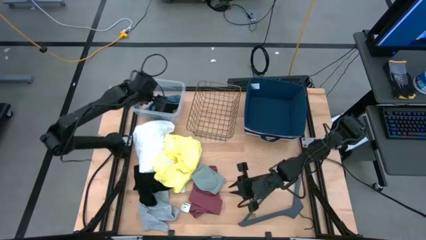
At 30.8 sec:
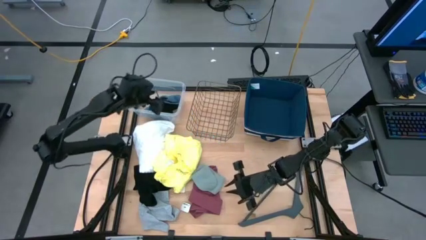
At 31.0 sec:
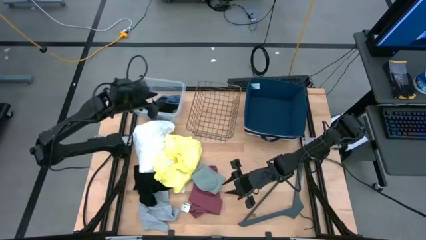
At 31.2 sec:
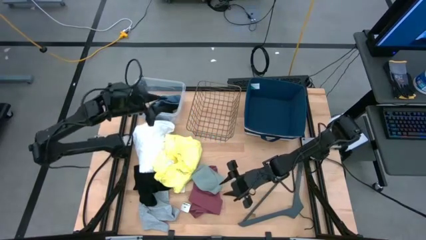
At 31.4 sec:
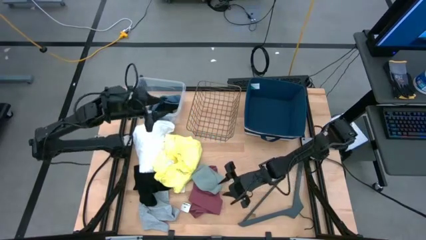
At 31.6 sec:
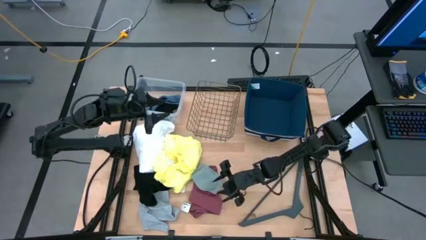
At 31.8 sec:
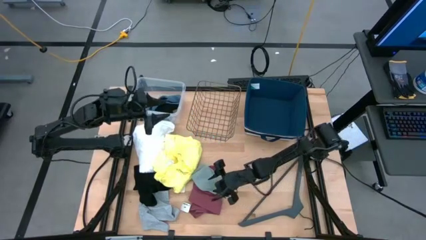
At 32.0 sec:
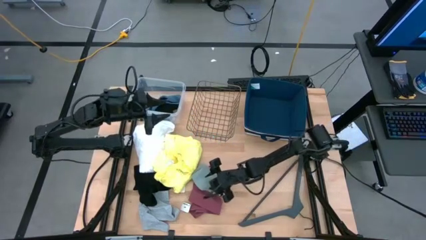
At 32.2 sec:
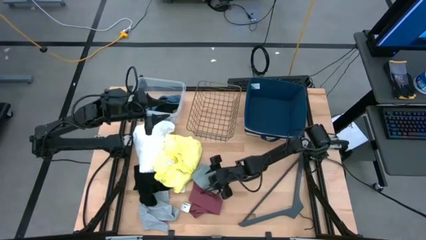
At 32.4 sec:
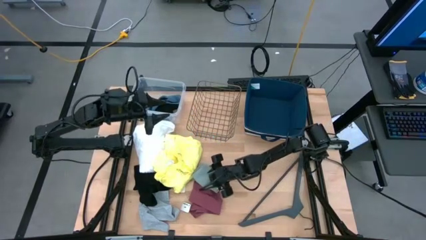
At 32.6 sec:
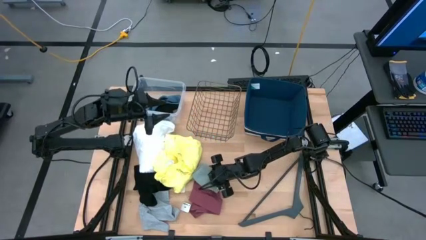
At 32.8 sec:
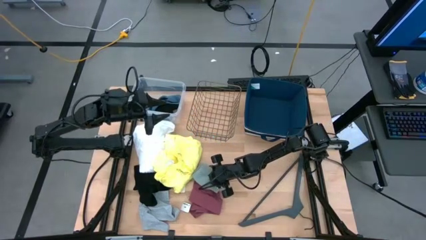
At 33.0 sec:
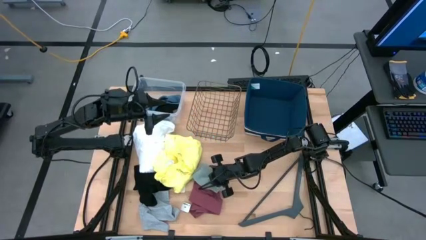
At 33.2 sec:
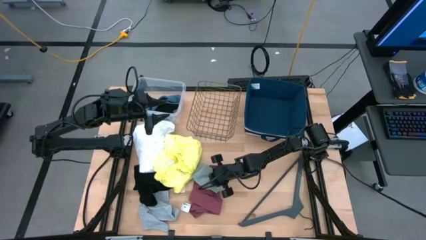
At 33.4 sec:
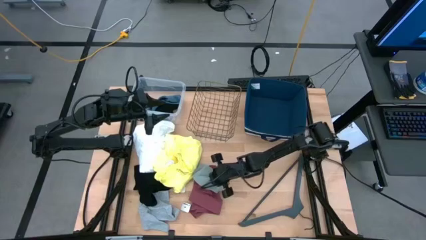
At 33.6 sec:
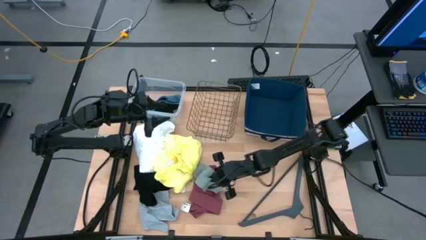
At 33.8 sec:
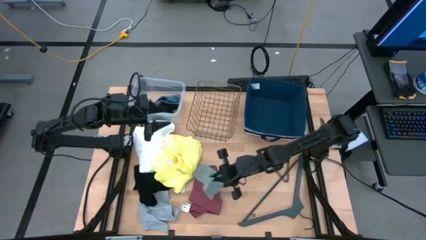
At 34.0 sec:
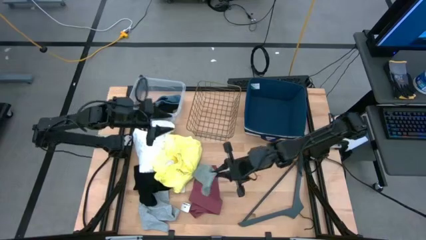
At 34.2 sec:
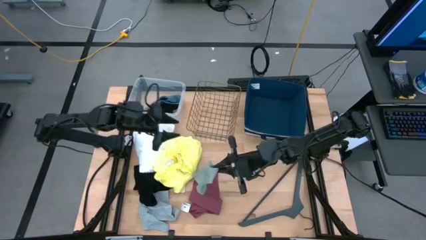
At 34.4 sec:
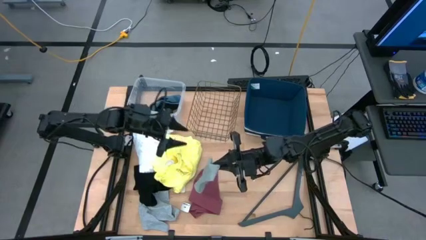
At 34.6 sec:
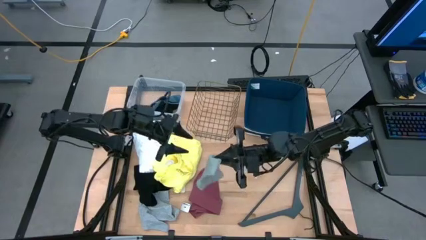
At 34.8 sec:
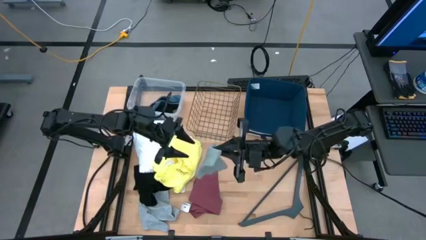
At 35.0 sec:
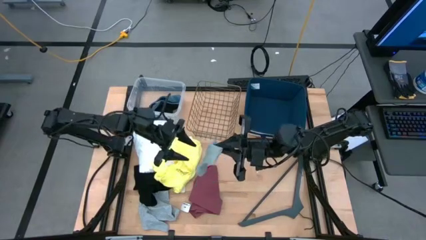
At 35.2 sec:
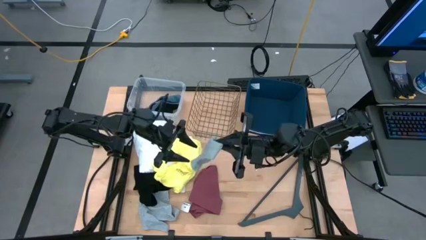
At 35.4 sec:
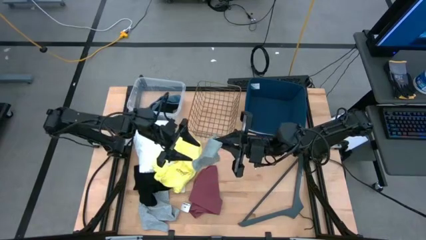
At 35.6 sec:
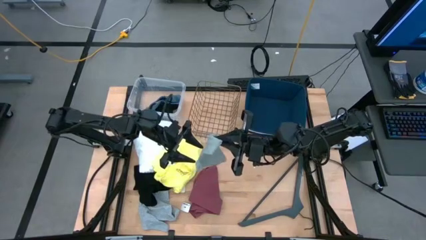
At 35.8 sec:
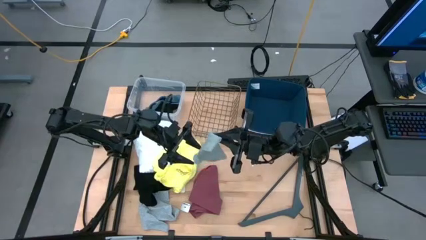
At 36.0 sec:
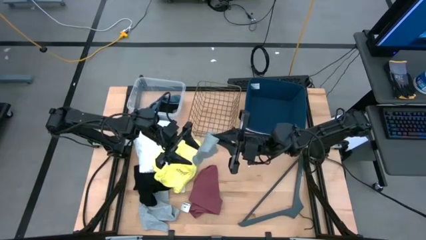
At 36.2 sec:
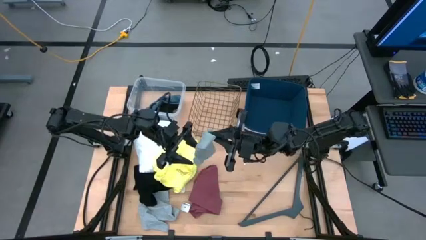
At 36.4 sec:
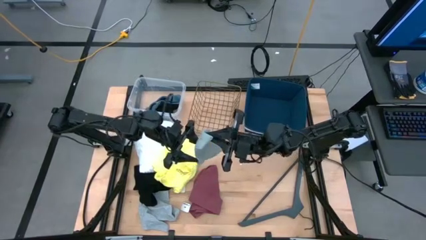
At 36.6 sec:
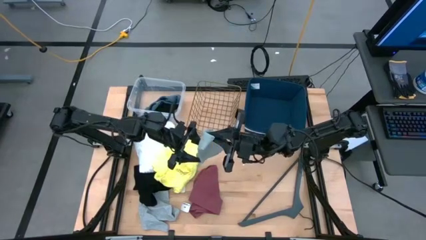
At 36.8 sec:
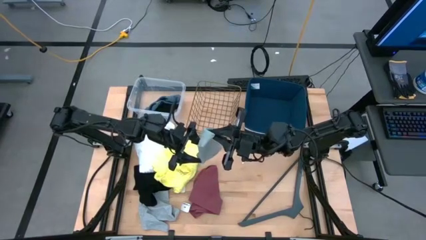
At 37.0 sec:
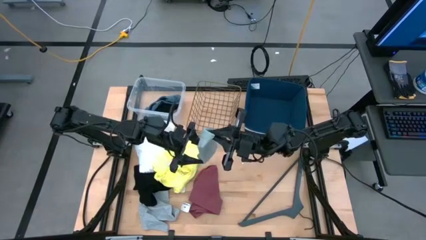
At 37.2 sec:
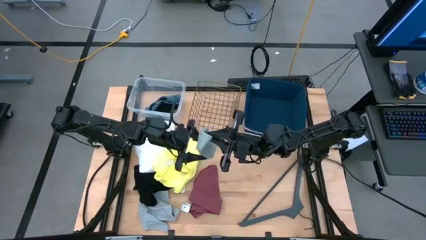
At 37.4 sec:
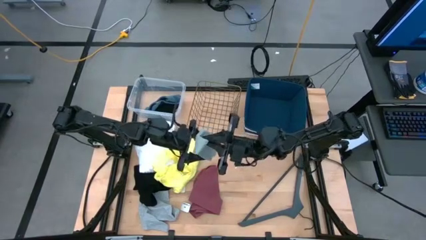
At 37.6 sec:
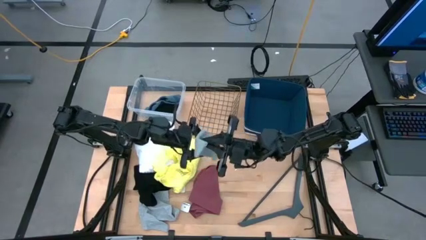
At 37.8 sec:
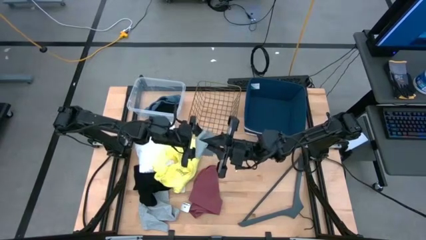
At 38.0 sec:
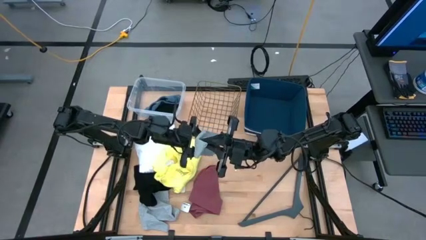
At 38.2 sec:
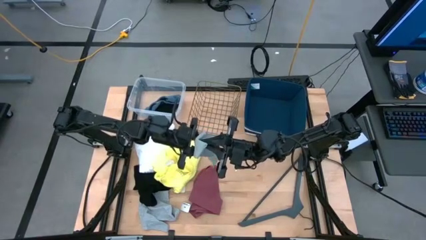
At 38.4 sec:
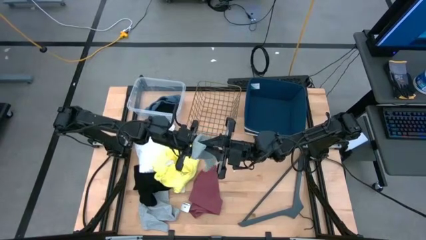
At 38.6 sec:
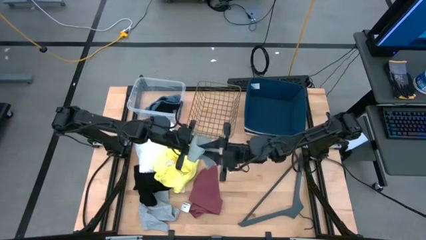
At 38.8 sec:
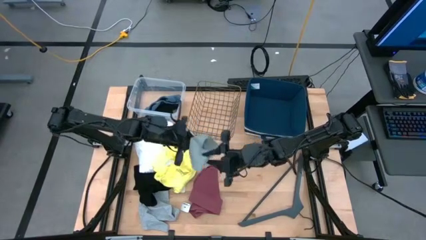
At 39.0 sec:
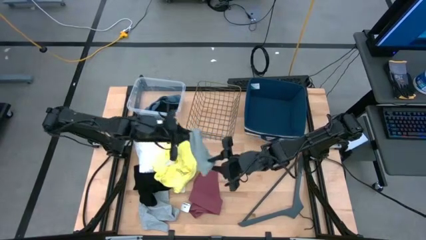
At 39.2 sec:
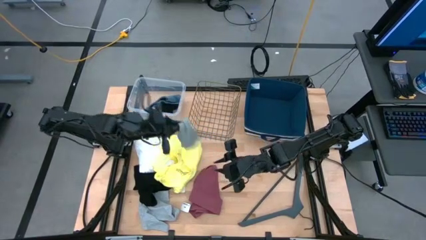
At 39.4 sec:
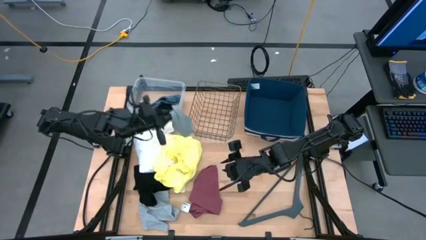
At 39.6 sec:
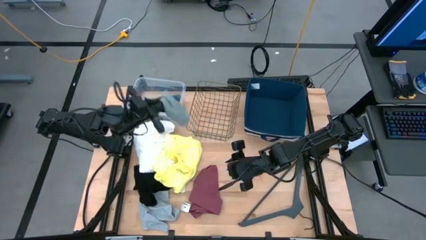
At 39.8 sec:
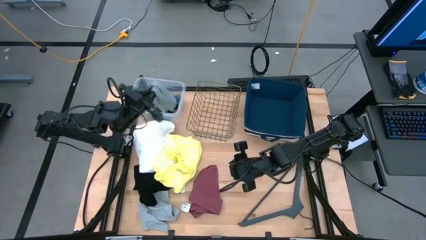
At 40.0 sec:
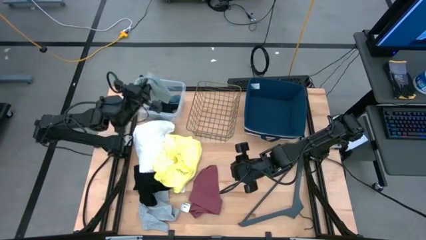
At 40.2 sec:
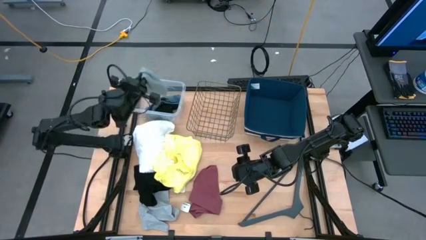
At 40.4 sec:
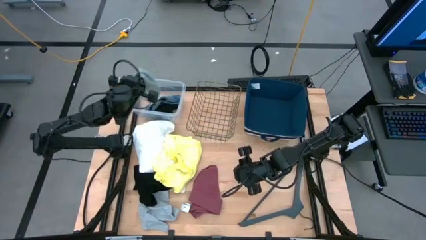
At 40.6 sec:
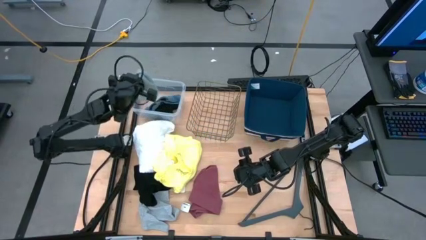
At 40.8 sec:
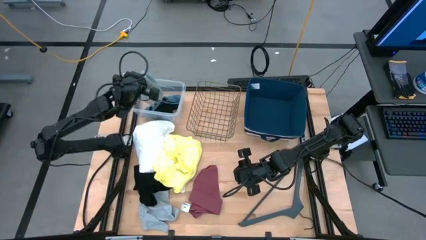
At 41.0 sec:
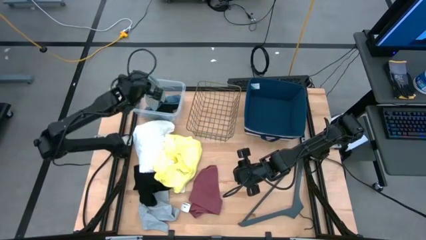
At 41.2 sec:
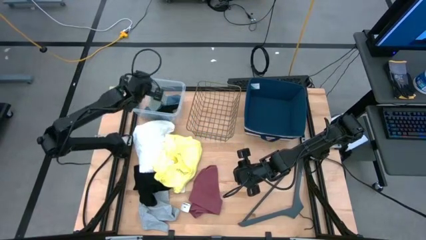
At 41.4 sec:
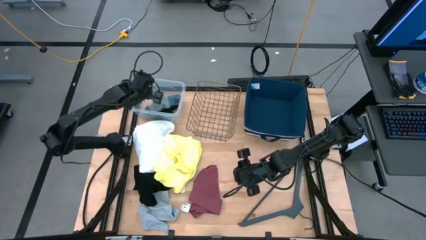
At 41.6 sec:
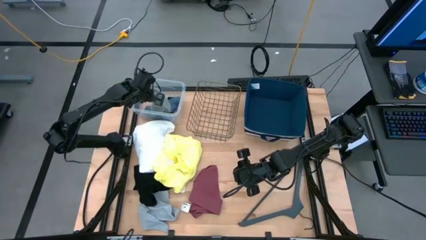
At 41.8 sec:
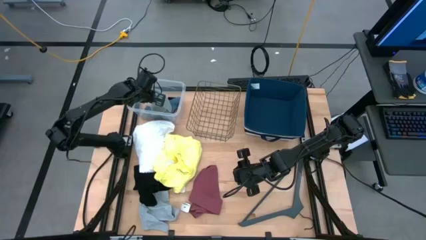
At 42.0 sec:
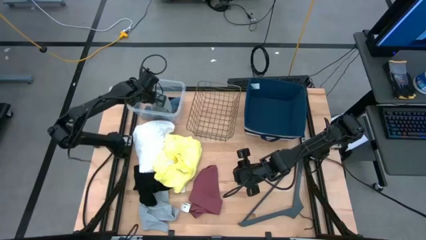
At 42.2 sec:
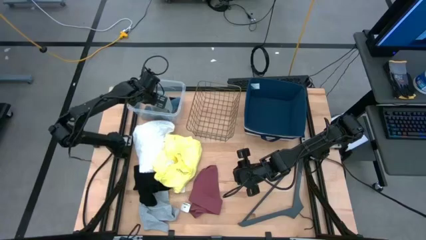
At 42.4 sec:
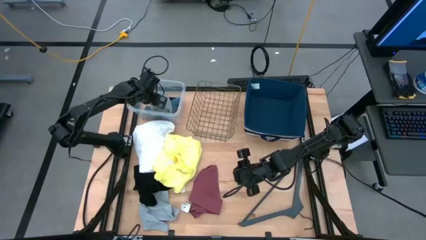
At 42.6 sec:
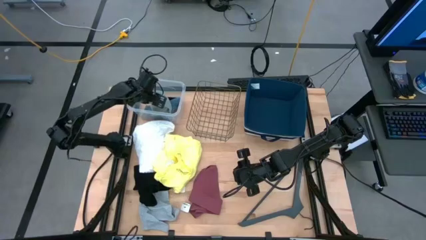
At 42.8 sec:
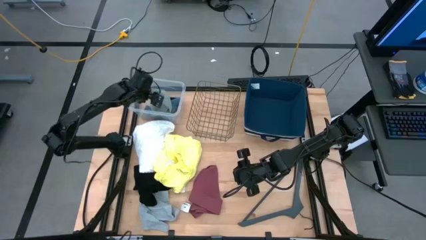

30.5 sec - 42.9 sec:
Task: Pick & Place Cloths
Put the gray sock into the transparent bin

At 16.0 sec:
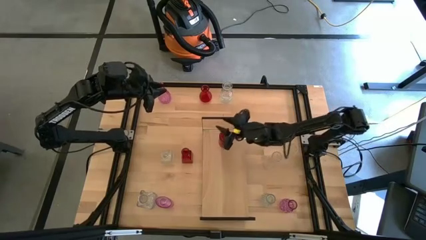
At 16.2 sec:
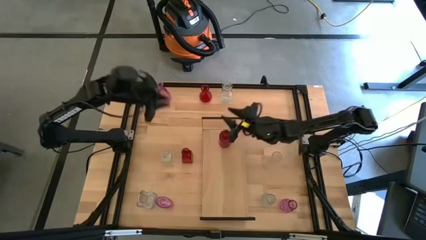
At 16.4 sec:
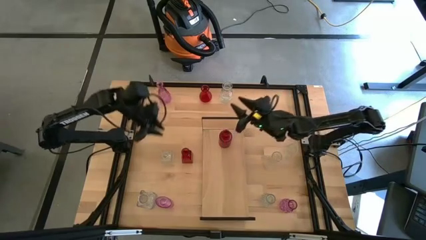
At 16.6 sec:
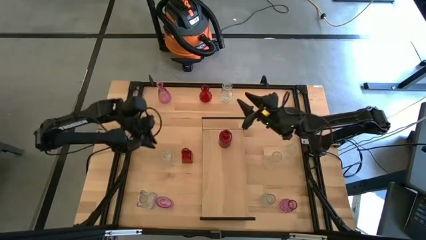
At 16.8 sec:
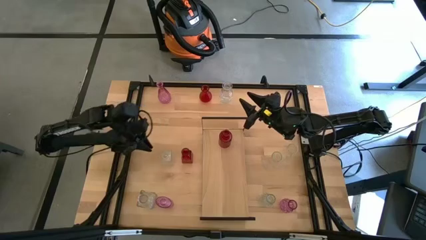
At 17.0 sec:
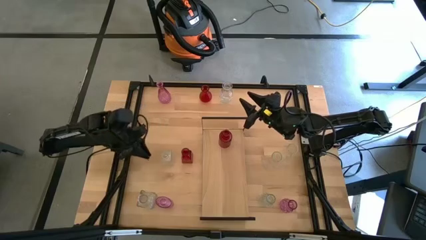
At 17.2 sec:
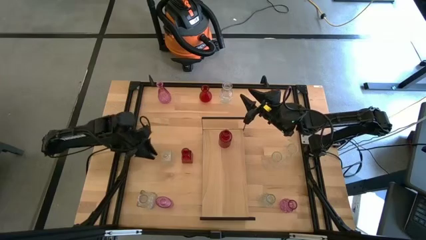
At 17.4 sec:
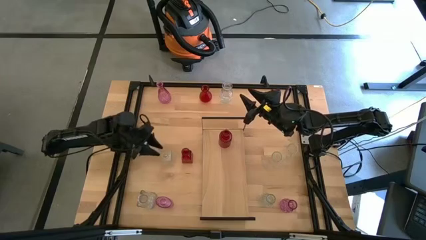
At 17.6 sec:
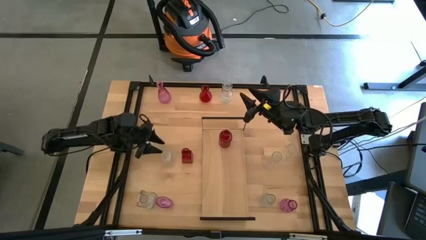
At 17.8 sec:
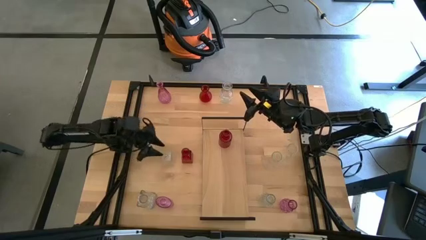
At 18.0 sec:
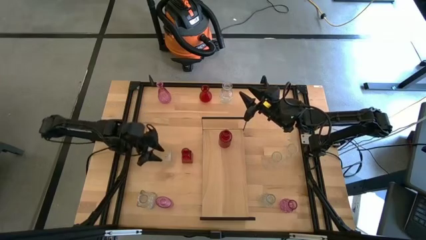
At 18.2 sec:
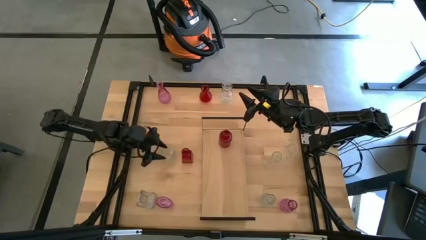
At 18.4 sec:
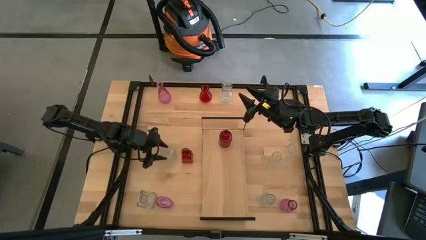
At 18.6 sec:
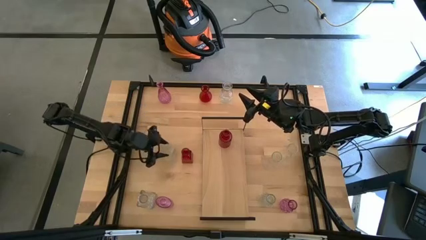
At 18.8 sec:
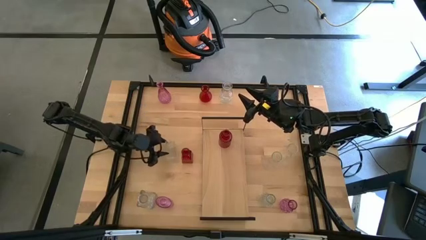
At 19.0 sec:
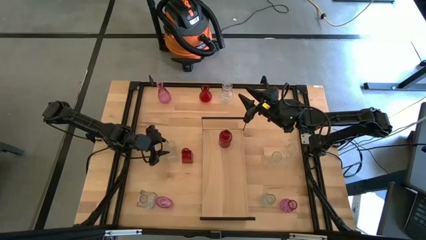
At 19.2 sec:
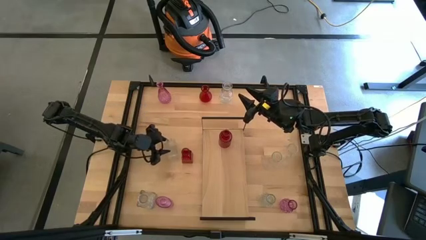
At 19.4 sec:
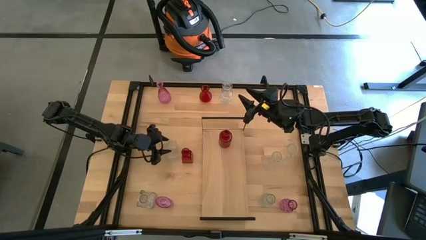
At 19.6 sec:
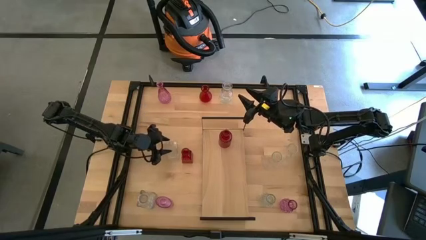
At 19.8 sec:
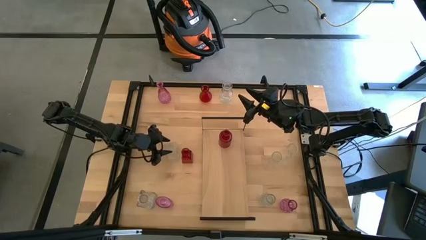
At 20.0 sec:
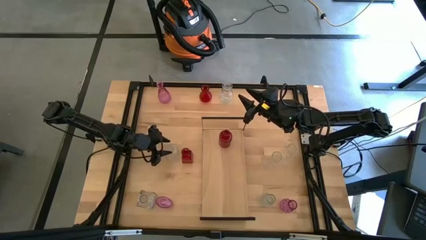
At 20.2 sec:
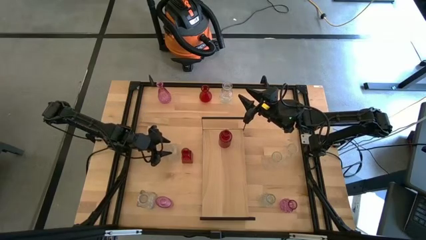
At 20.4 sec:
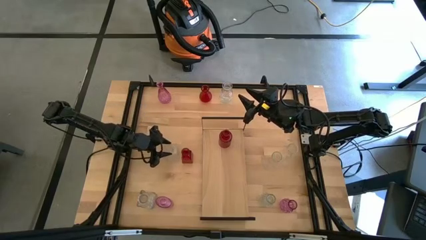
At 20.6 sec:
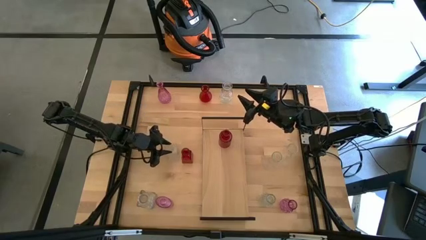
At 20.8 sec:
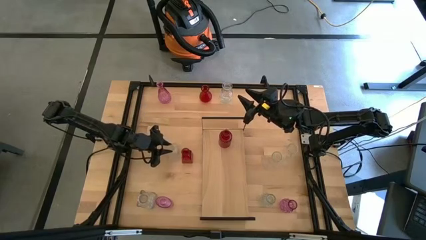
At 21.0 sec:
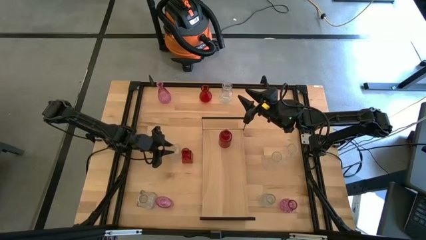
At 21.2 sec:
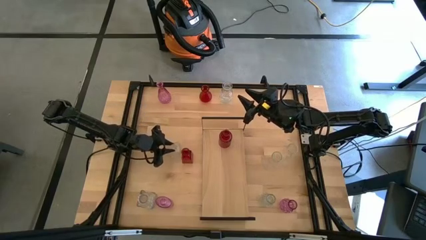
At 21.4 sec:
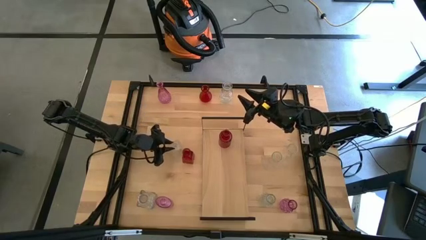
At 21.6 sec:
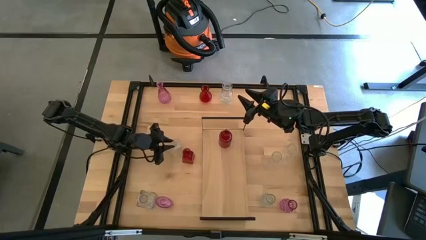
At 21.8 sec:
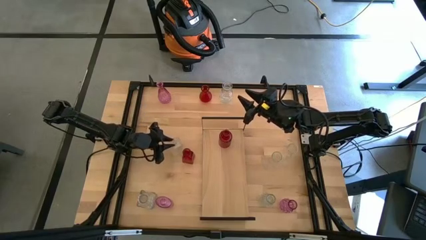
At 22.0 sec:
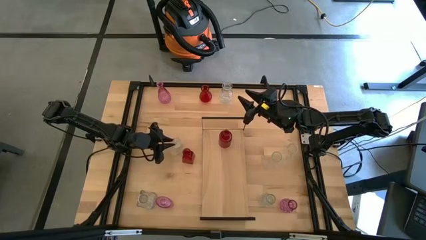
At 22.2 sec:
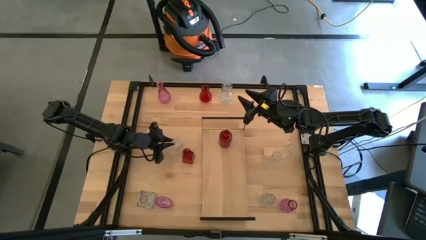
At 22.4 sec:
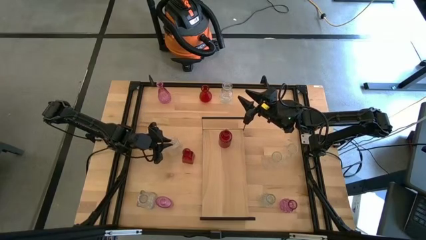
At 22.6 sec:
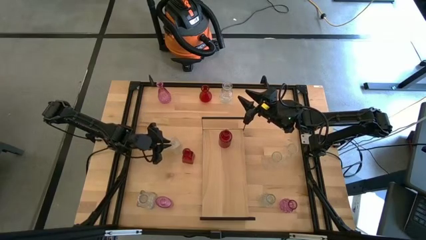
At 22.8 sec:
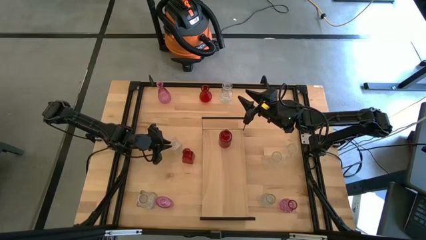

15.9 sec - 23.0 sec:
Task: sort vases onto shelf
Put the transparent vase on the shelf
